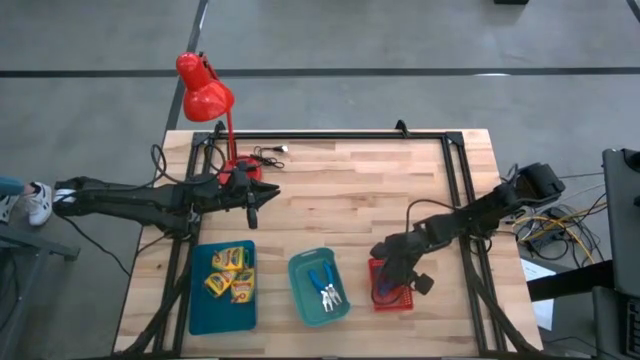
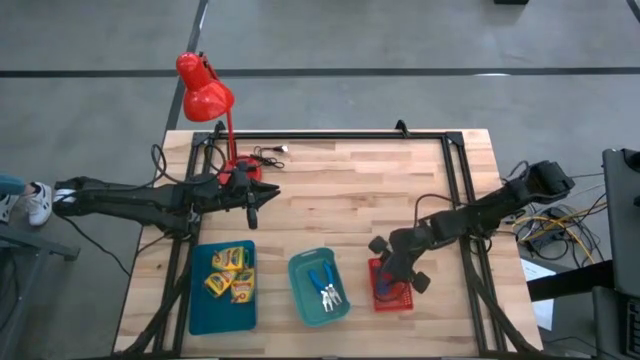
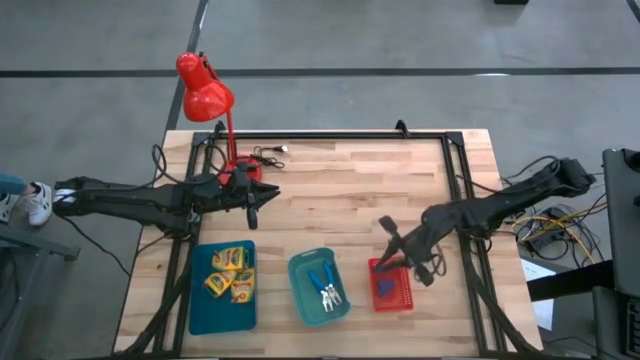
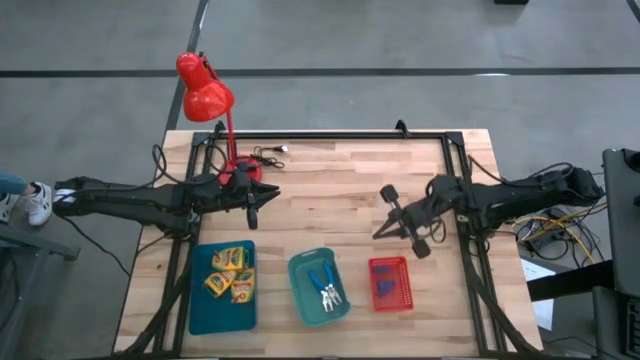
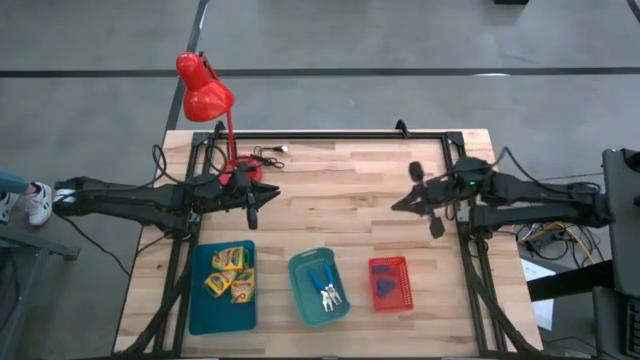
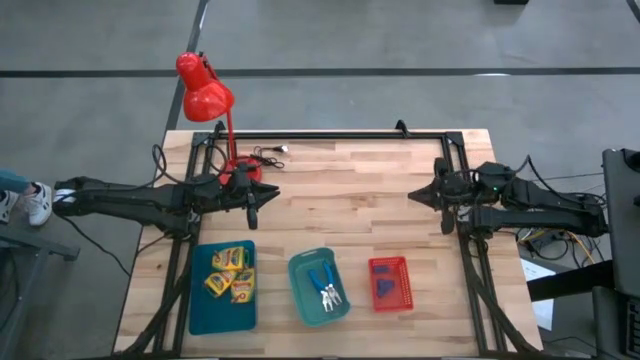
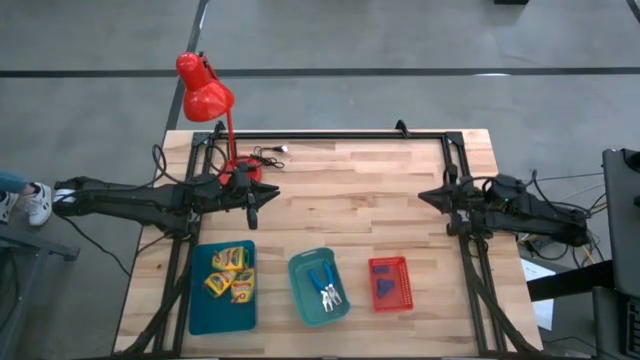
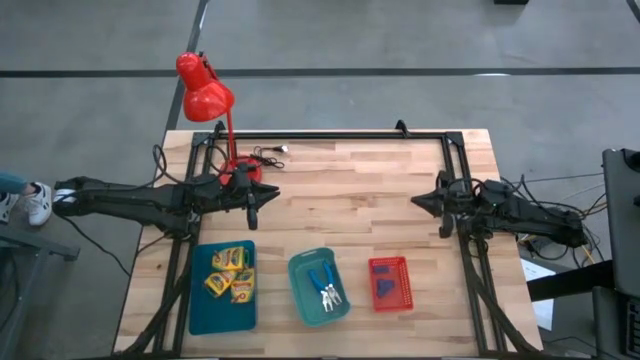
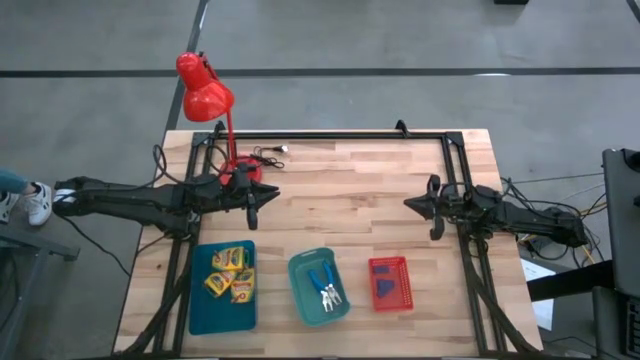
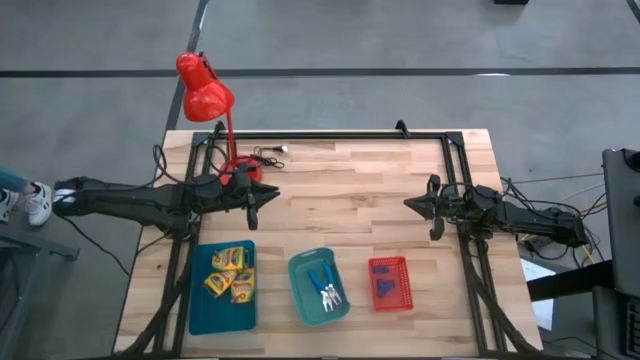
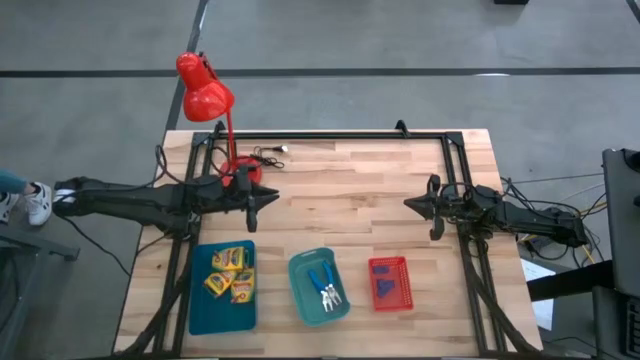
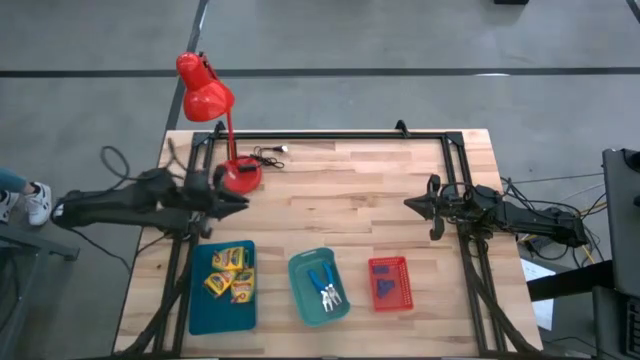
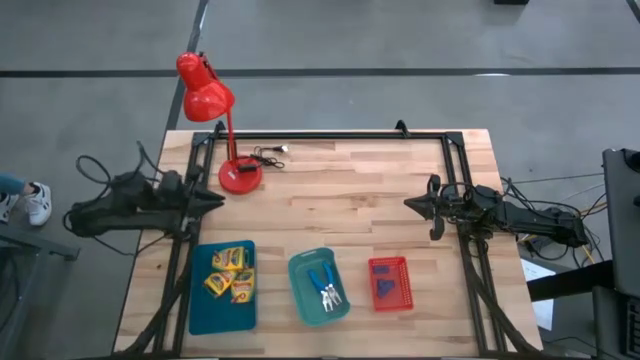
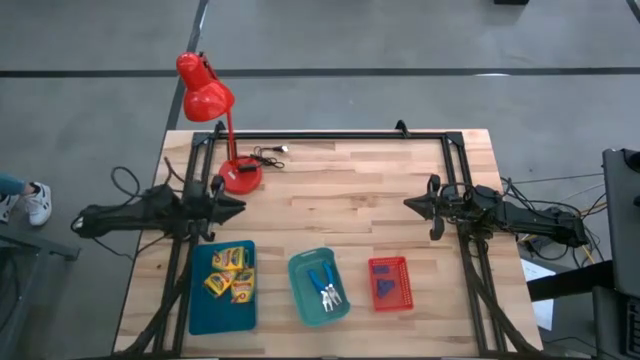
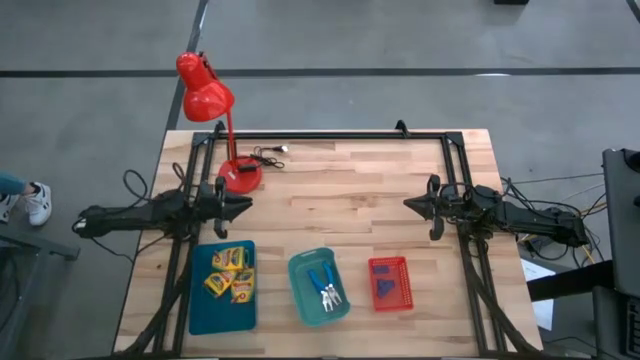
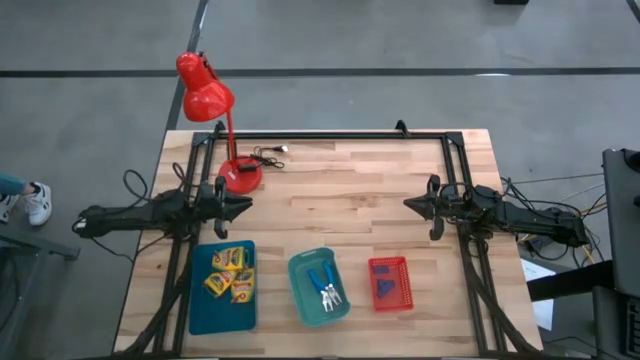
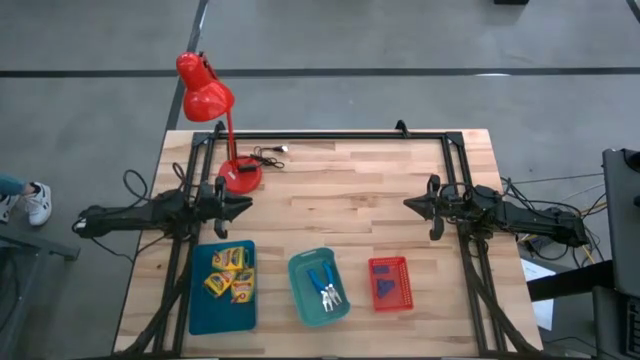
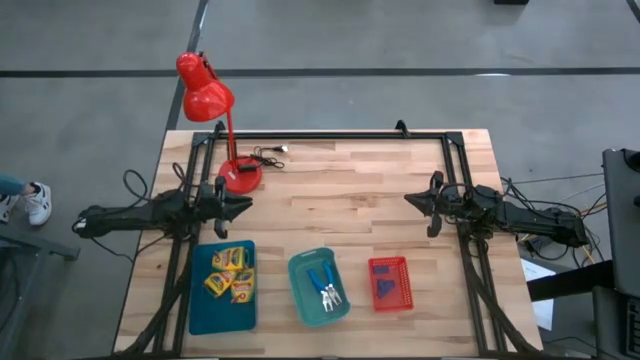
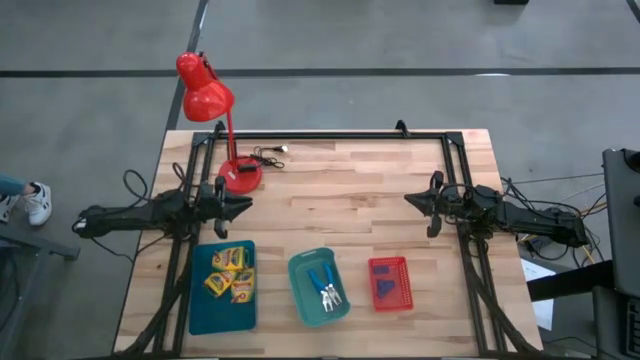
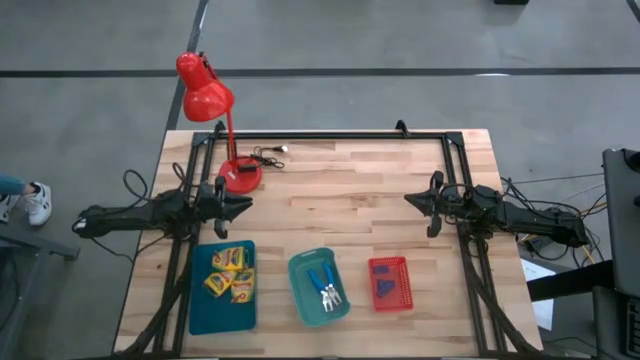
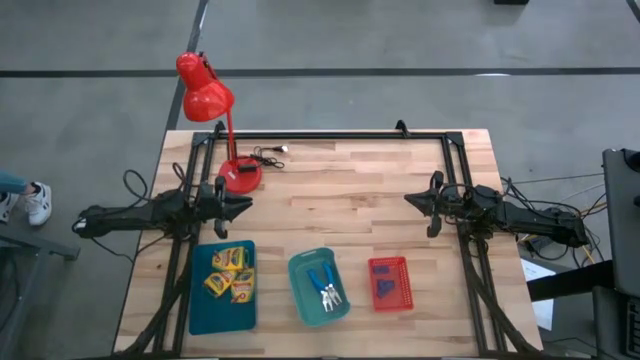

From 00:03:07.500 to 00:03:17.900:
Task: Pick & Place School Supplies
Return to Home Position

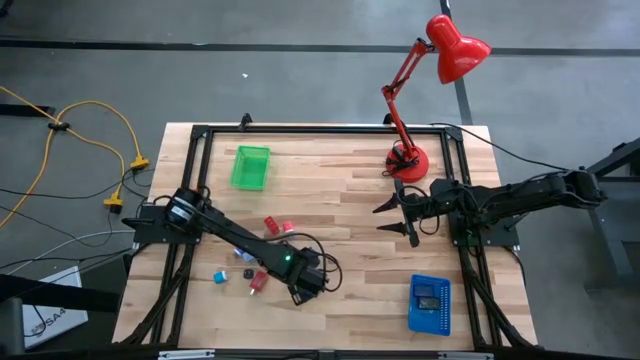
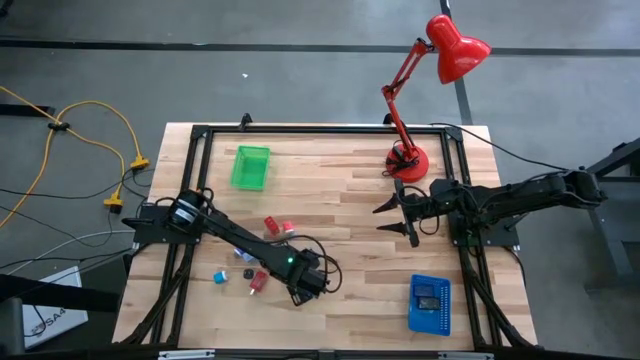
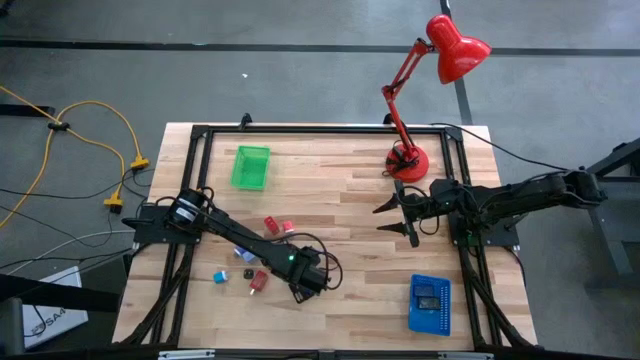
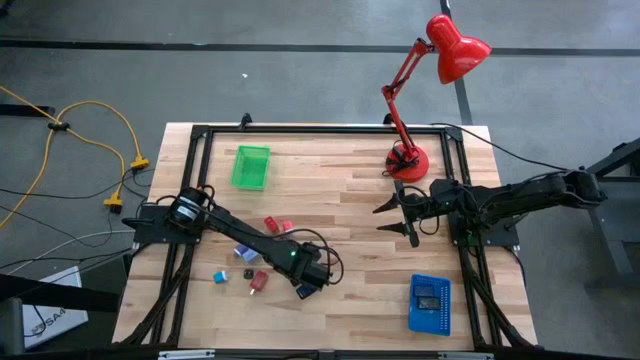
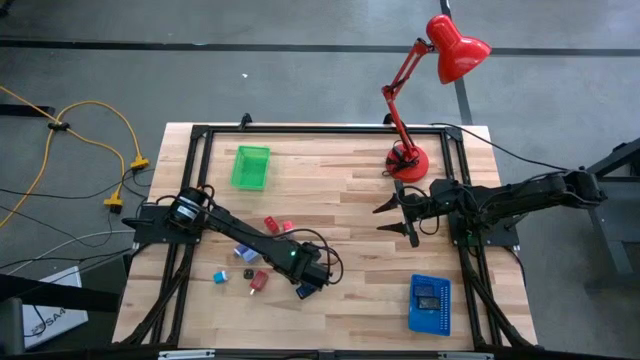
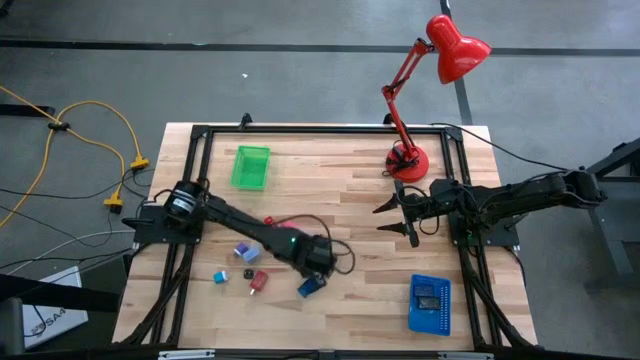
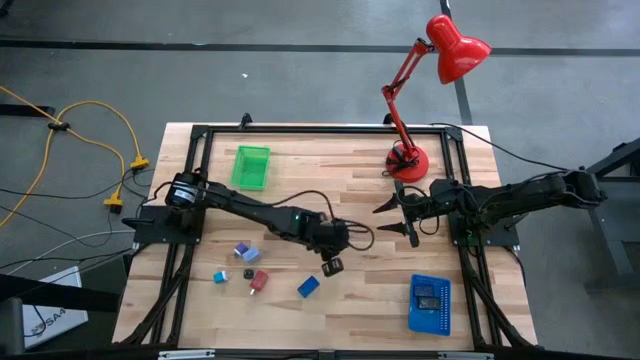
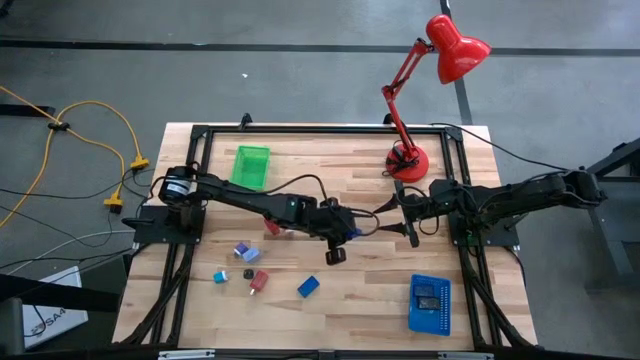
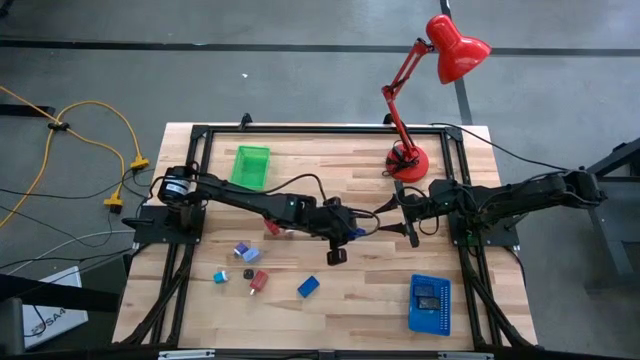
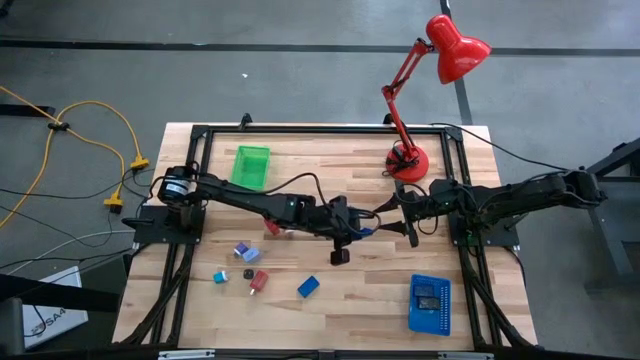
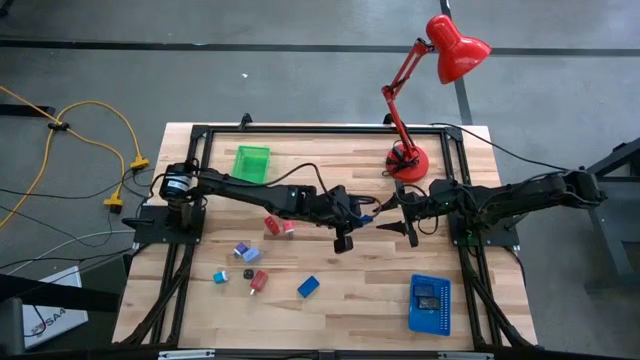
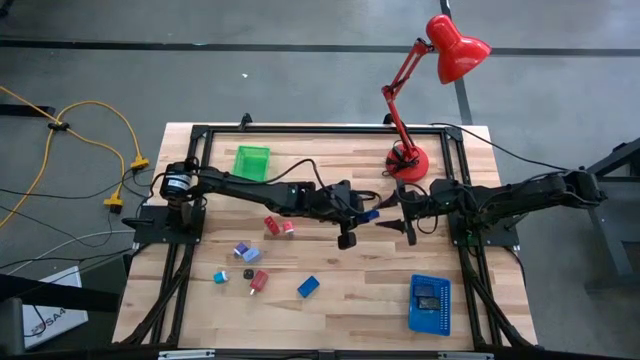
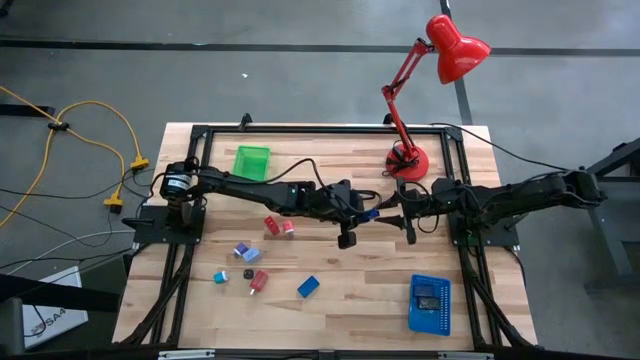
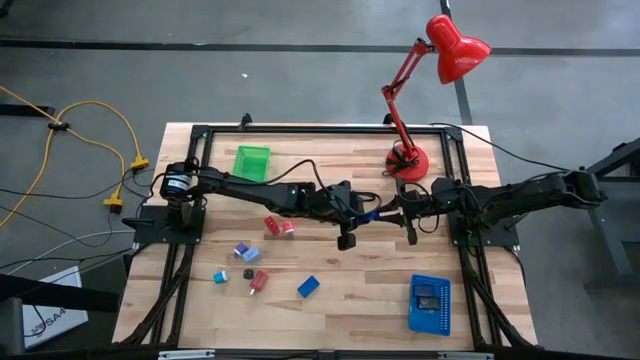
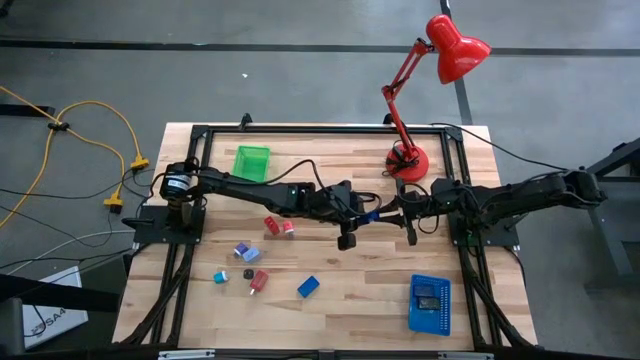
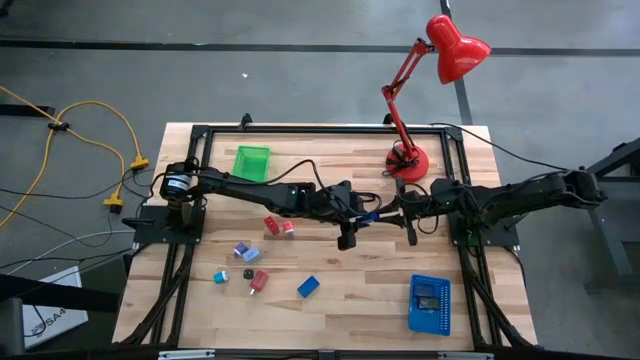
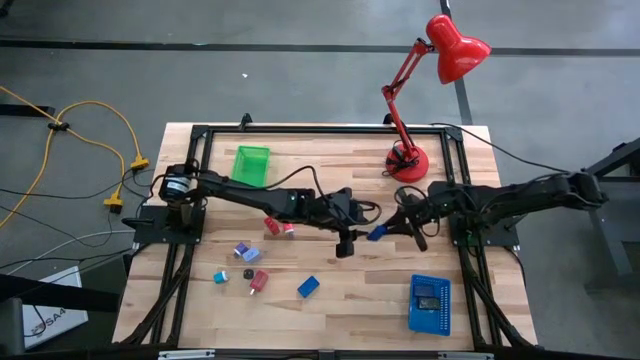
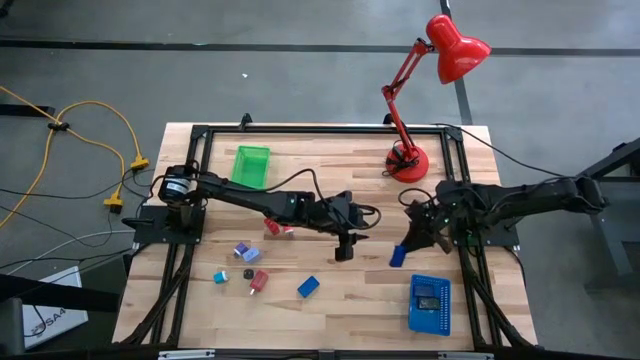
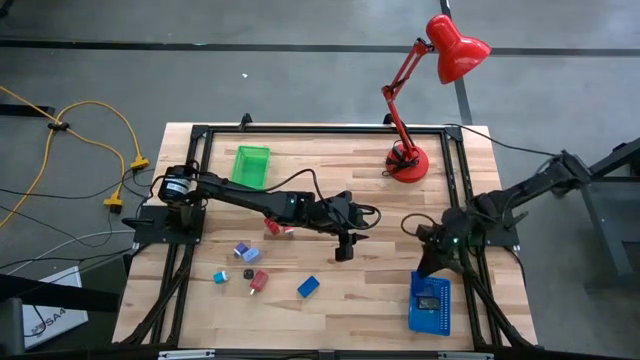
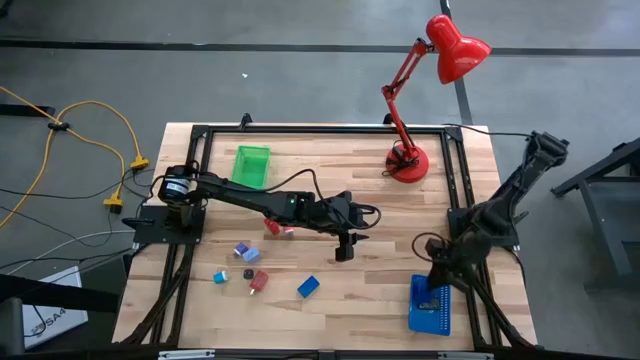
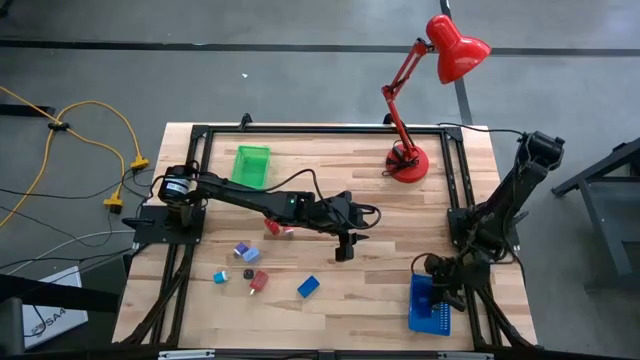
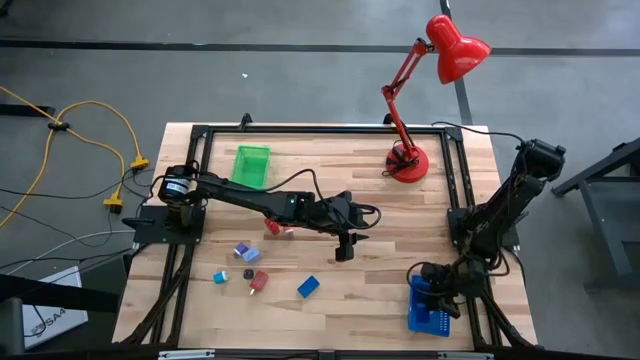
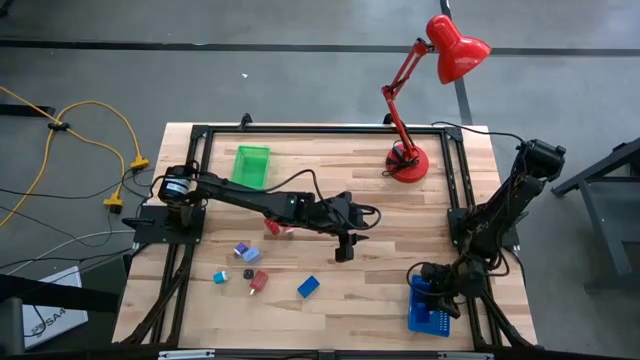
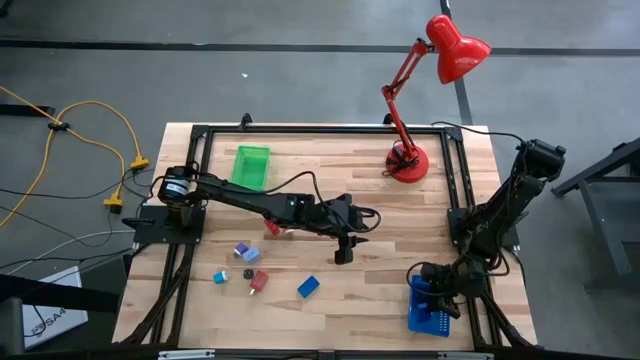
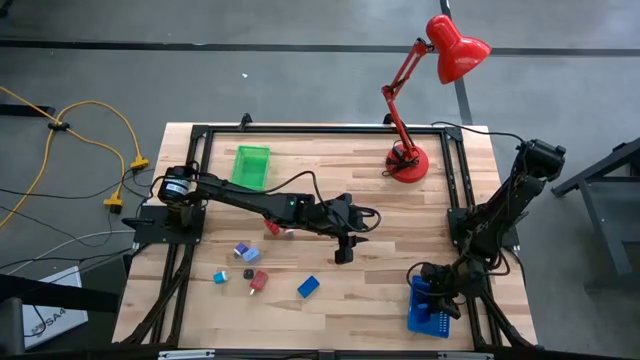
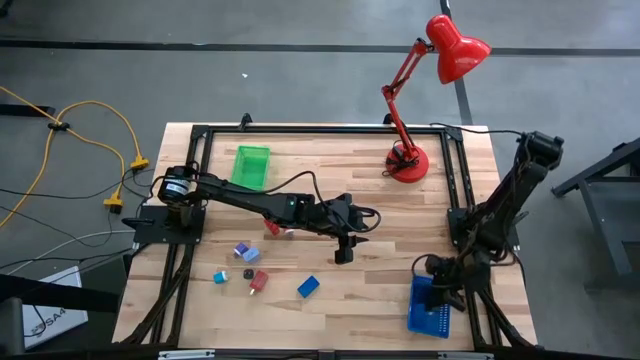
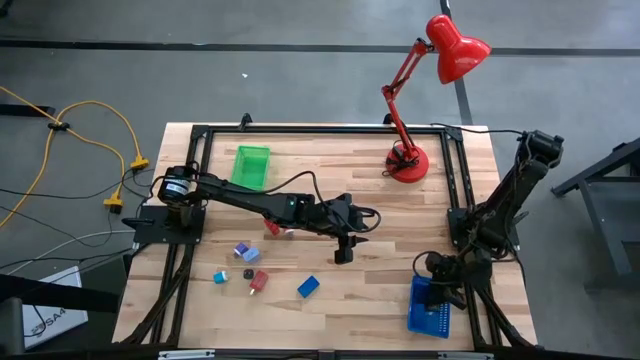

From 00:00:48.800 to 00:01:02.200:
Task: Pick & Place Office items
Put the top blue digital timer into the blue bin
